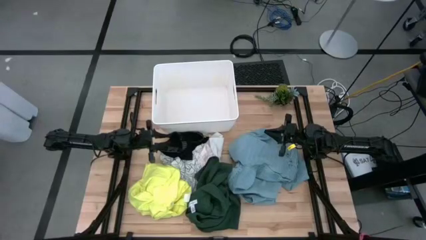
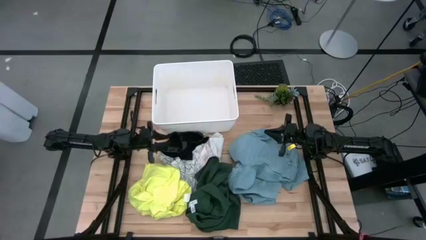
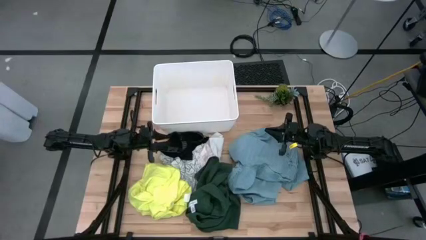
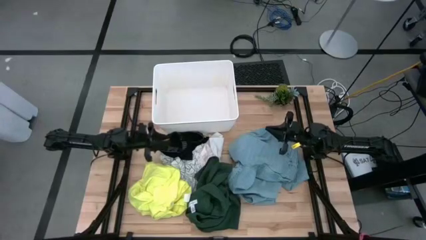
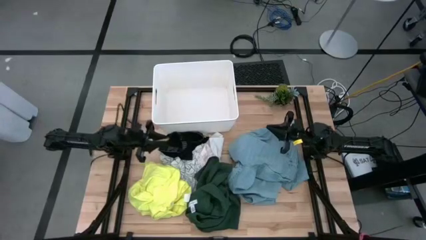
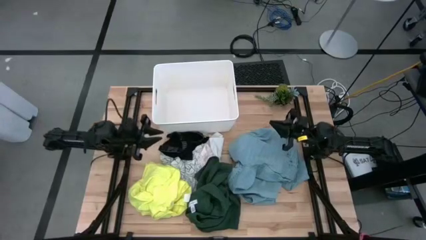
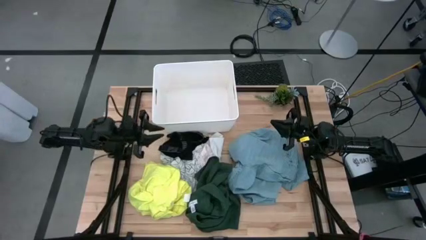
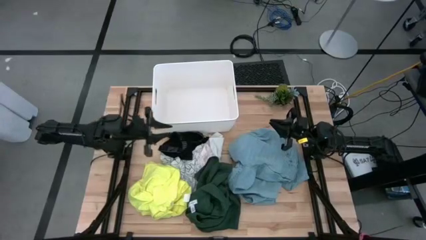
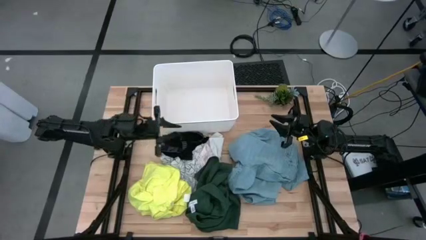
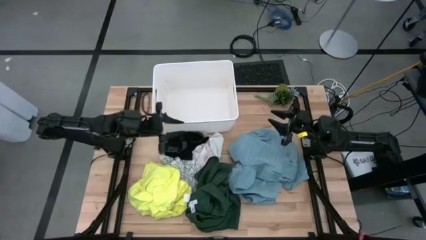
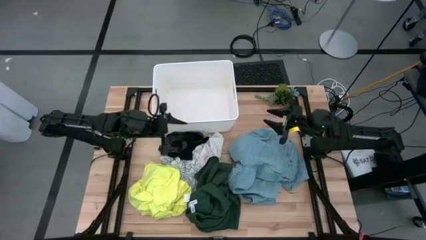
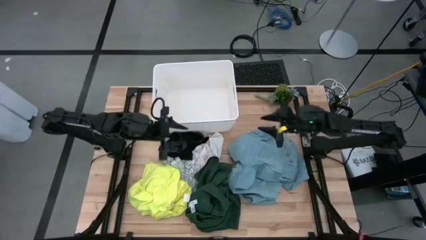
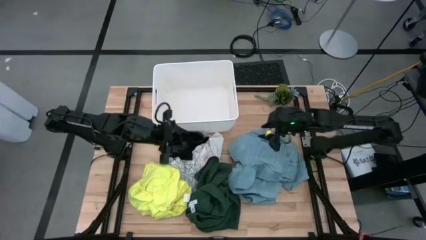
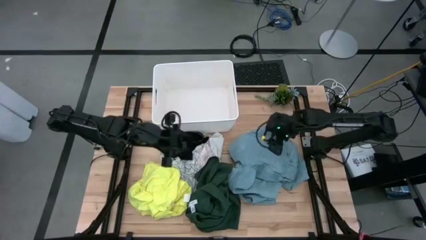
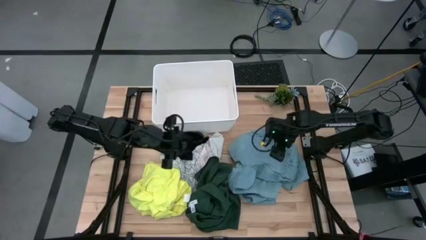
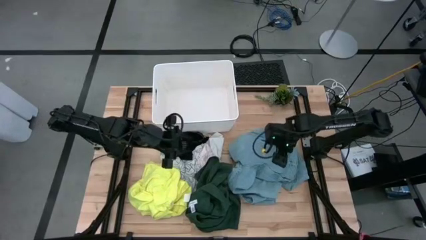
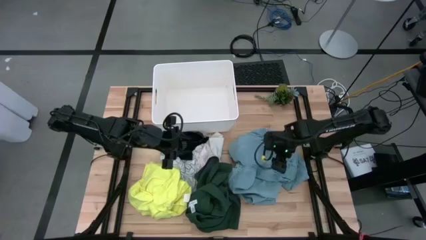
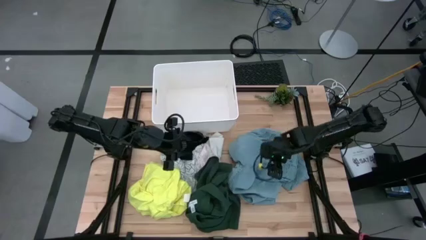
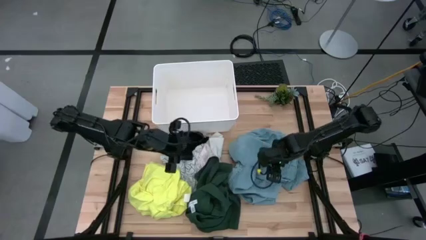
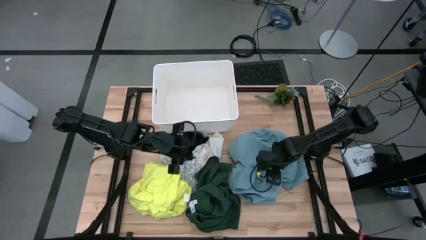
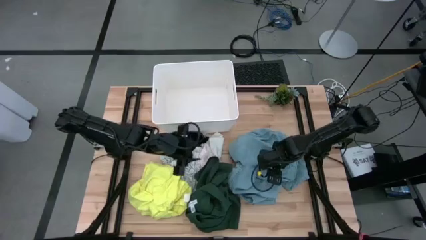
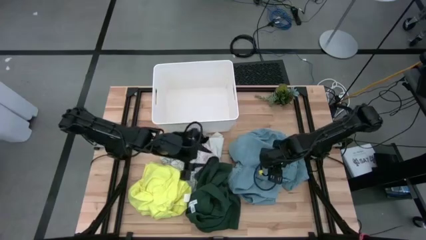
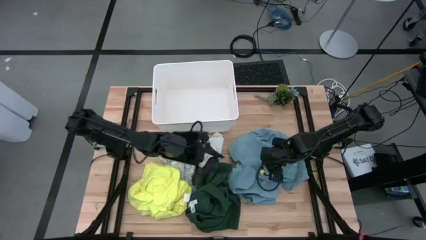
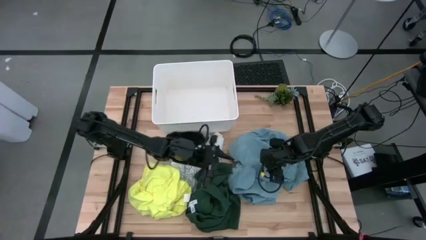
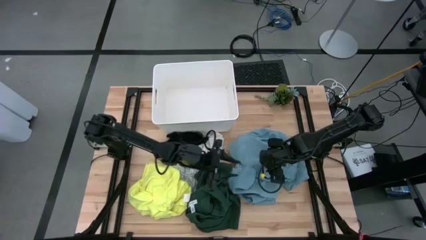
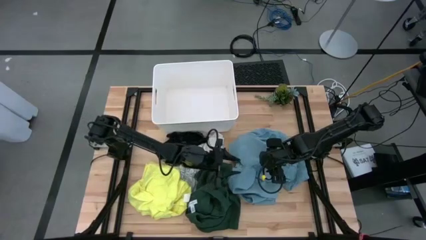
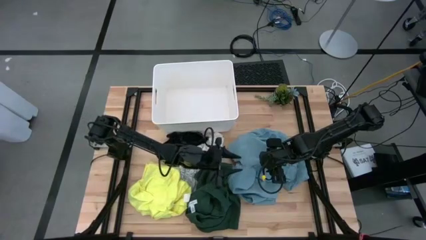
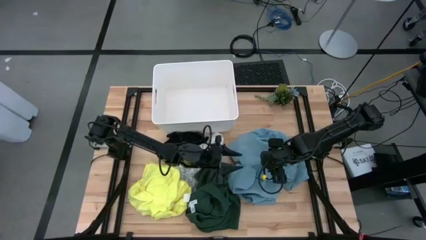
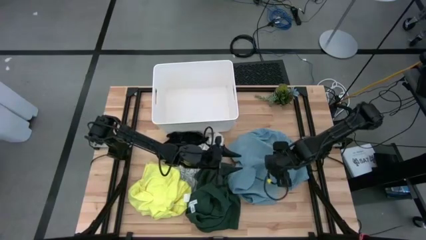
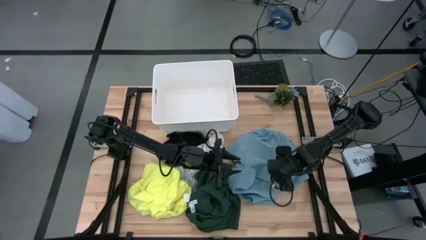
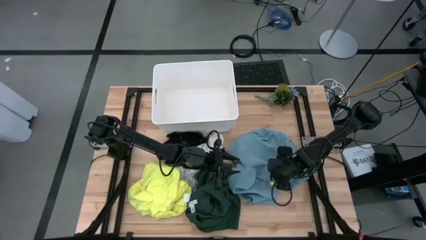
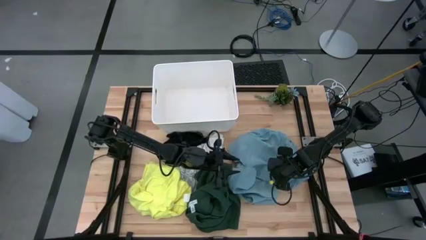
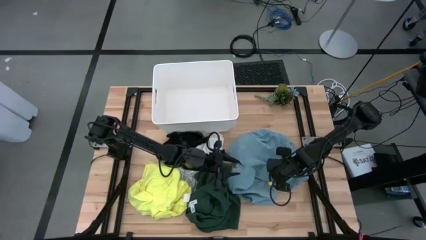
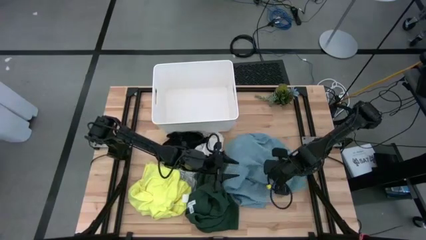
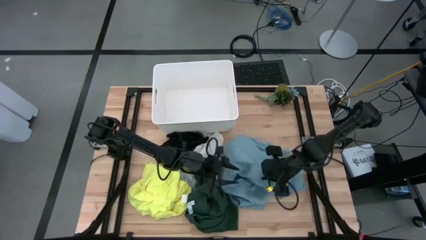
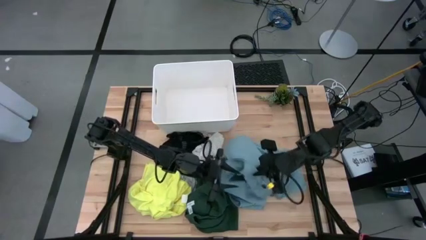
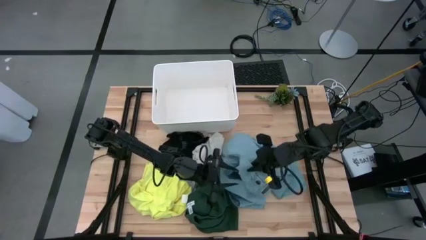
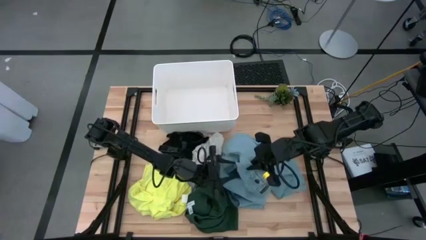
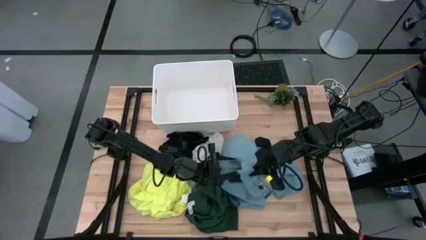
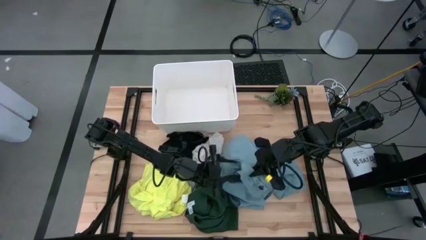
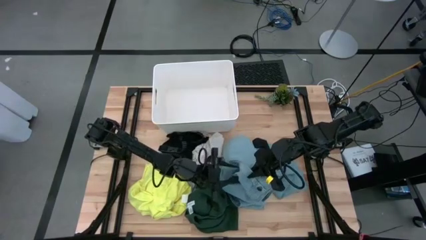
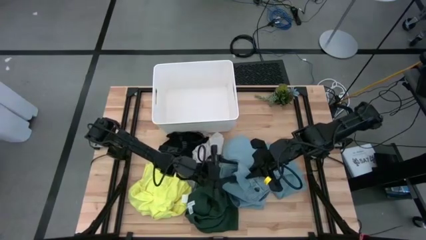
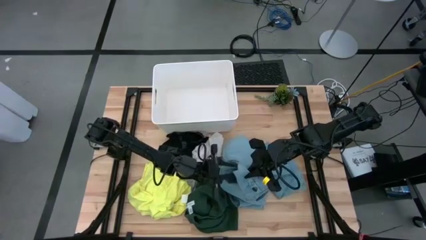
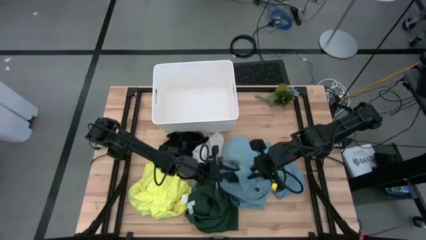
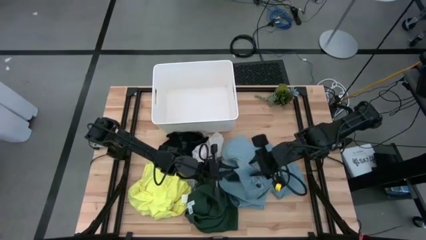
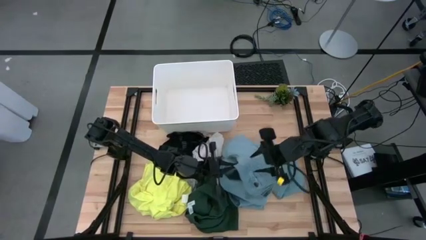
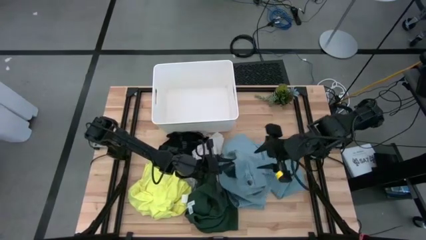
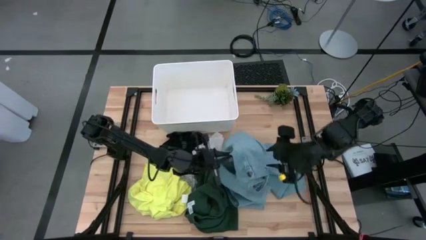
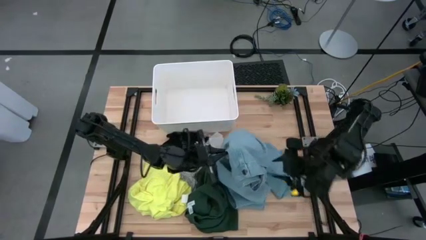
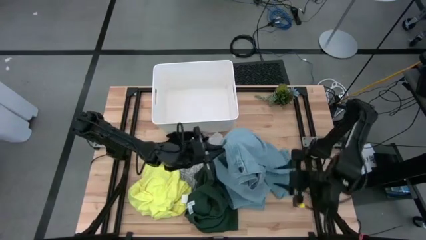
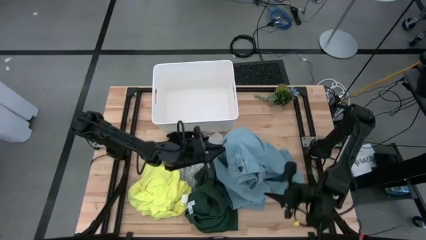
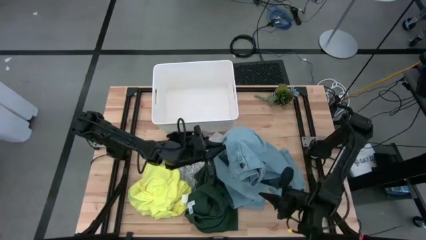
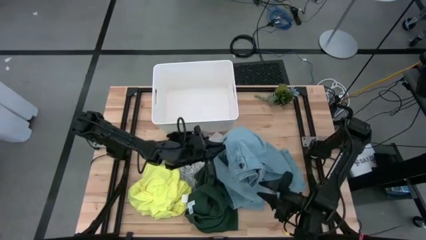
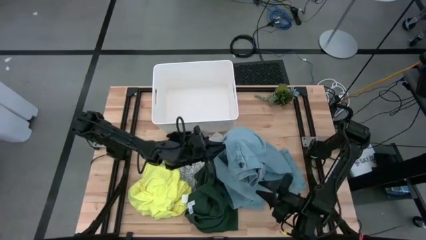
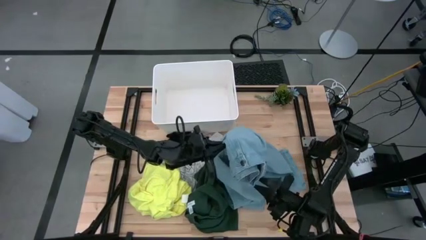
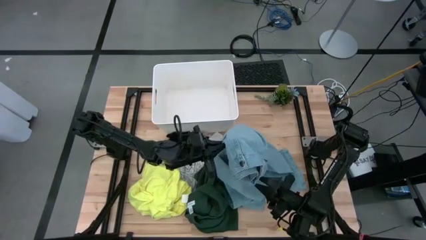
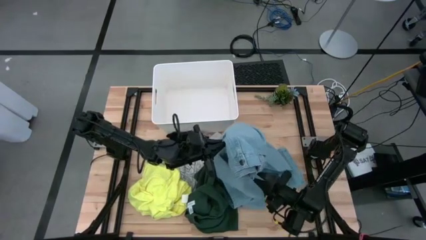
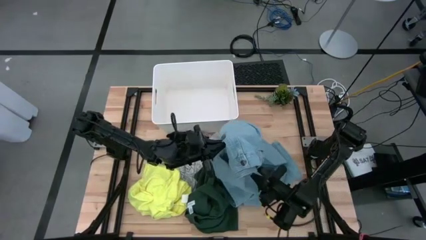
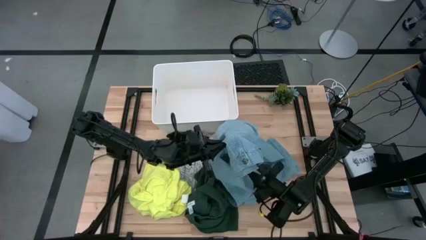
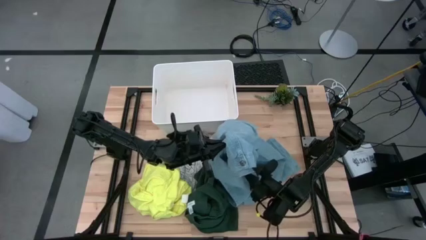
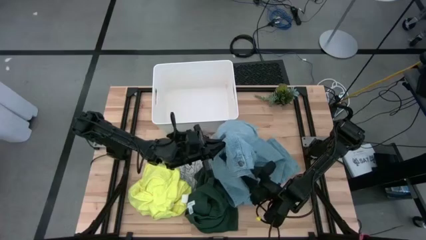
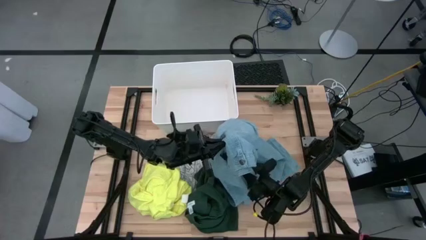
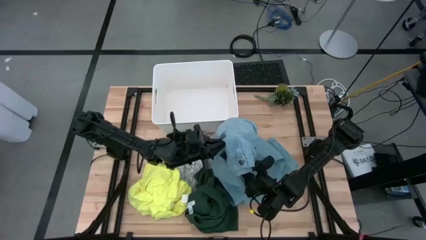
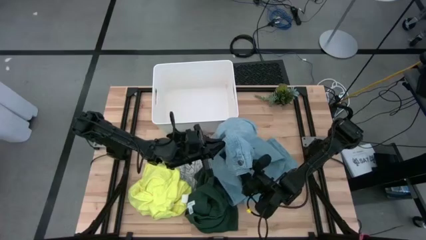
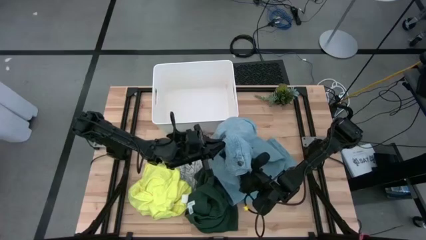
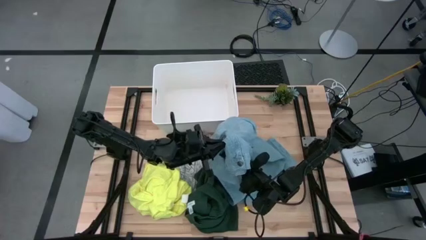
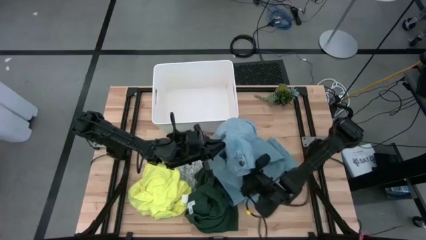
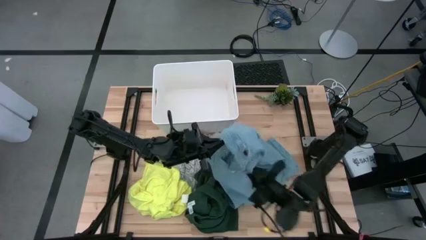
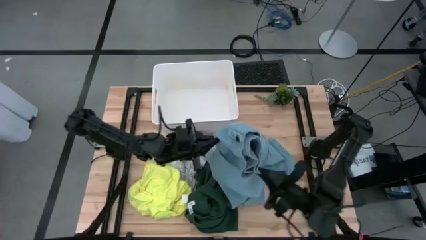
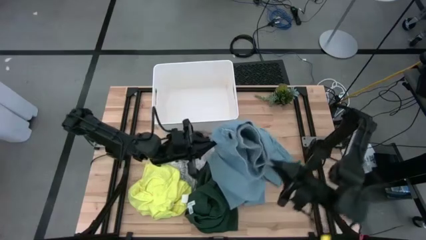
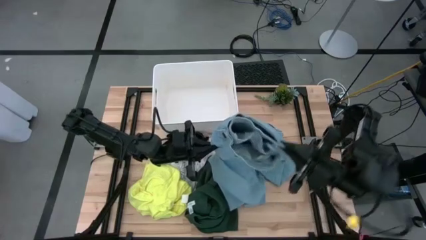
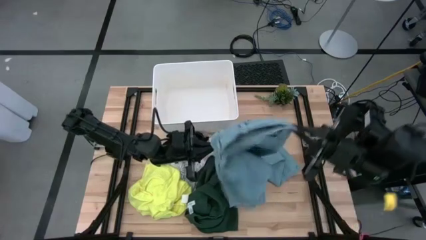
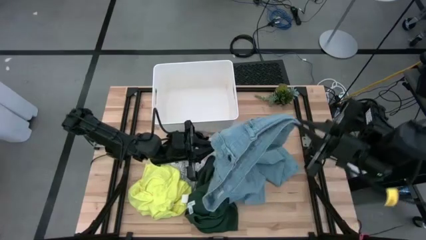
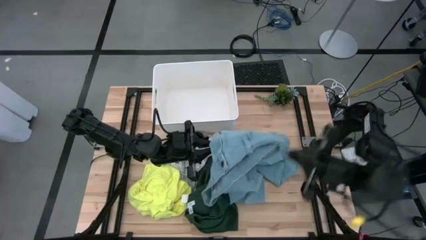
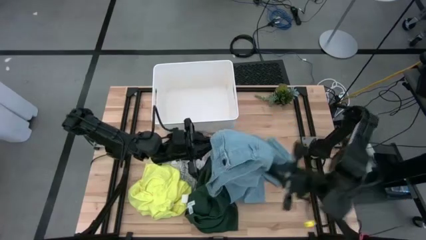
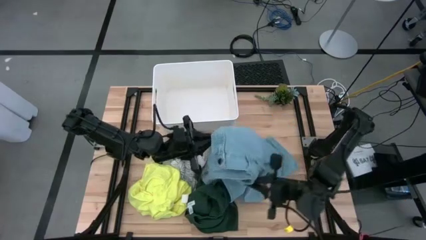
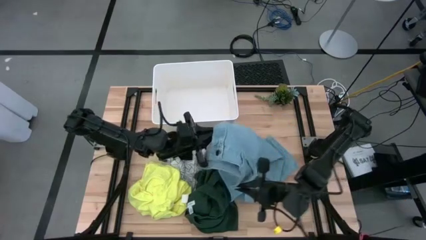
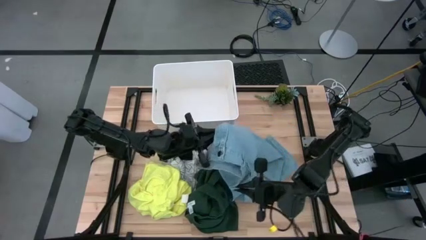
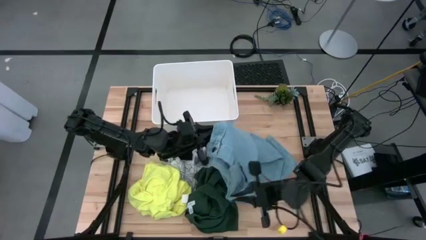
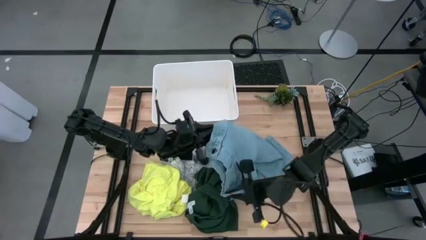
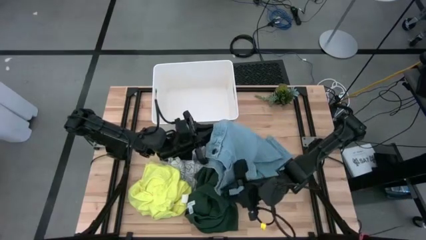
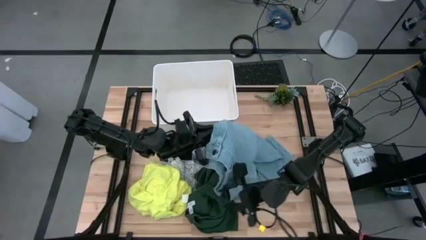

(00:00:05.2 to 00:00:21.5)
Task: Fold laundry
Fold the denim pants
